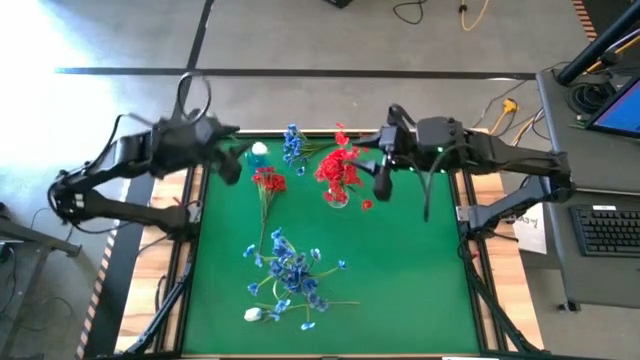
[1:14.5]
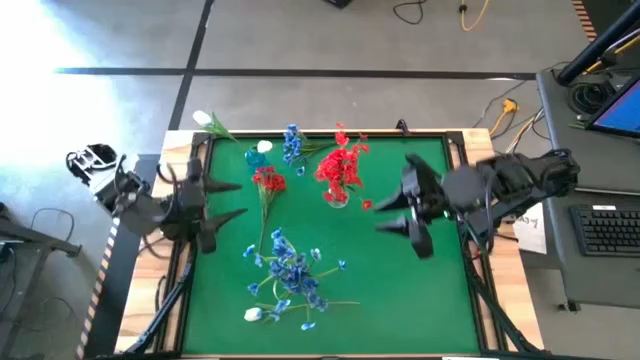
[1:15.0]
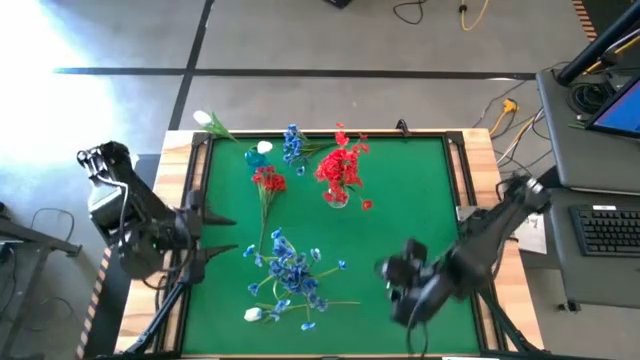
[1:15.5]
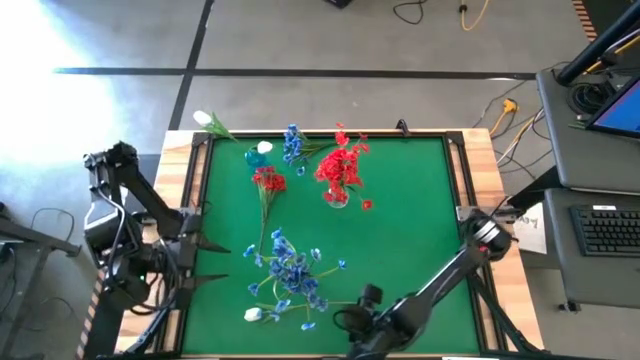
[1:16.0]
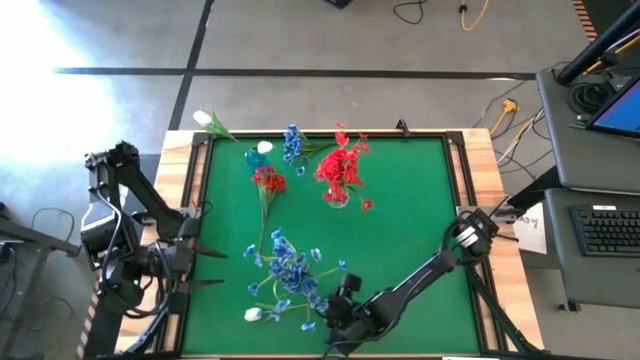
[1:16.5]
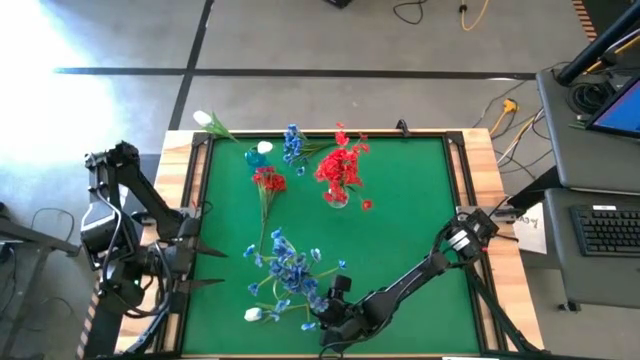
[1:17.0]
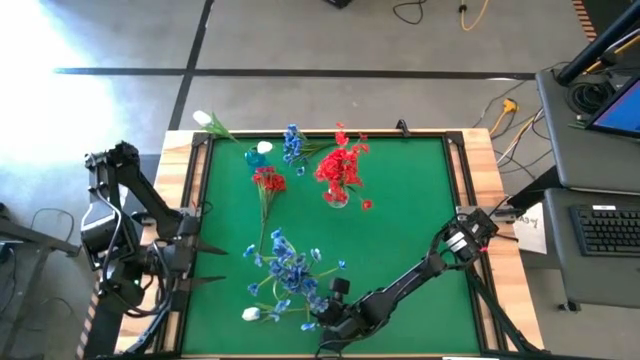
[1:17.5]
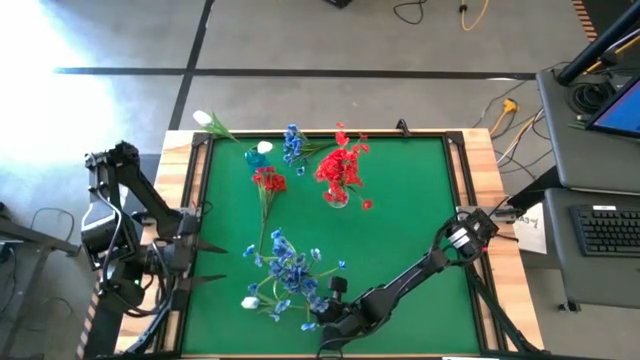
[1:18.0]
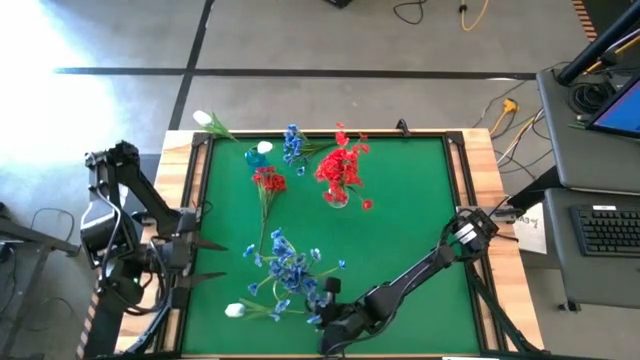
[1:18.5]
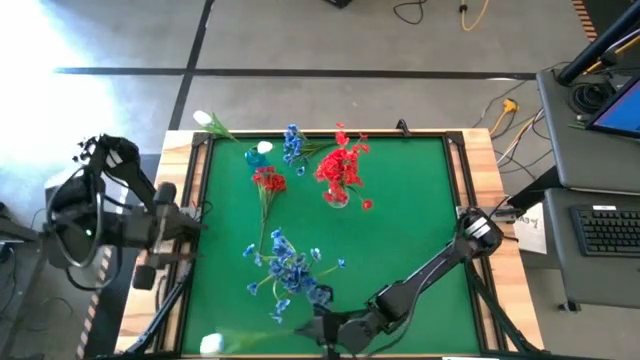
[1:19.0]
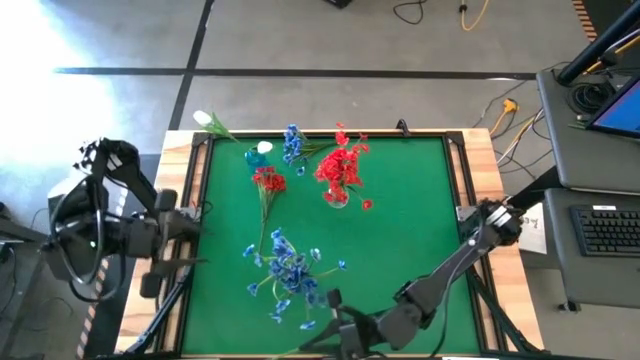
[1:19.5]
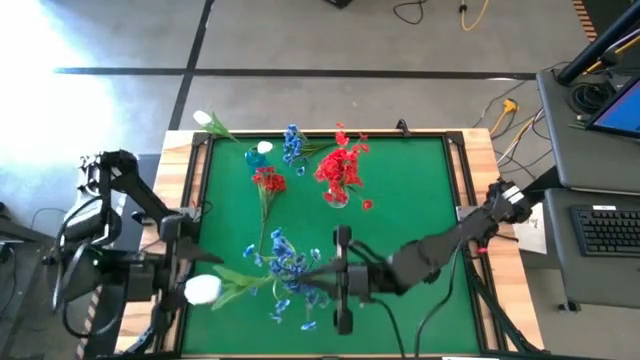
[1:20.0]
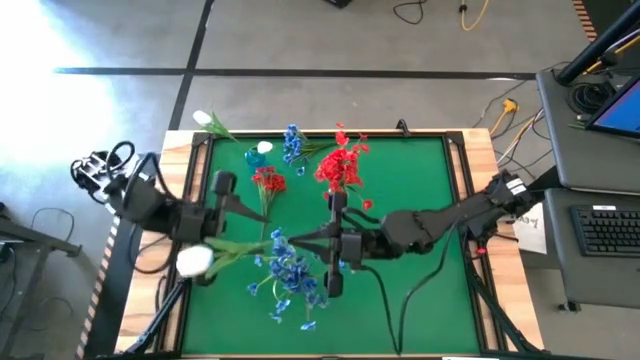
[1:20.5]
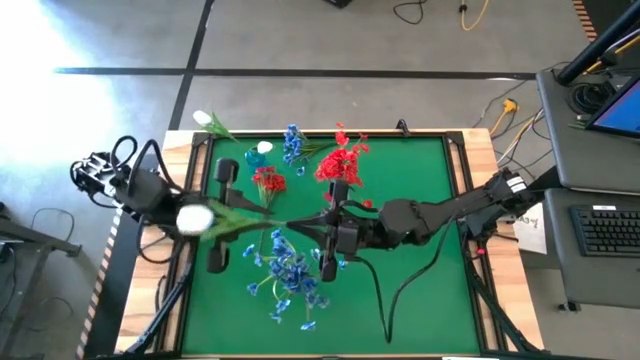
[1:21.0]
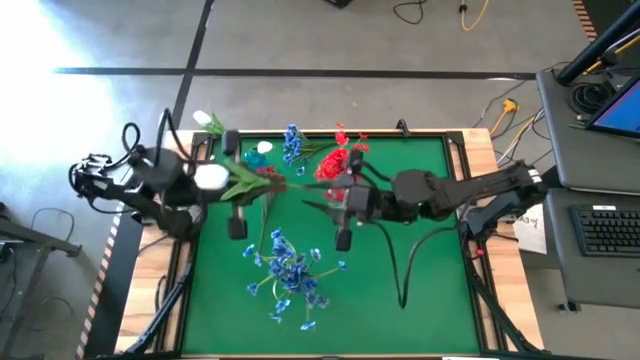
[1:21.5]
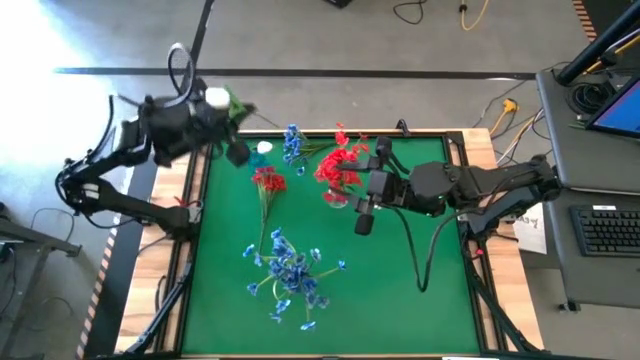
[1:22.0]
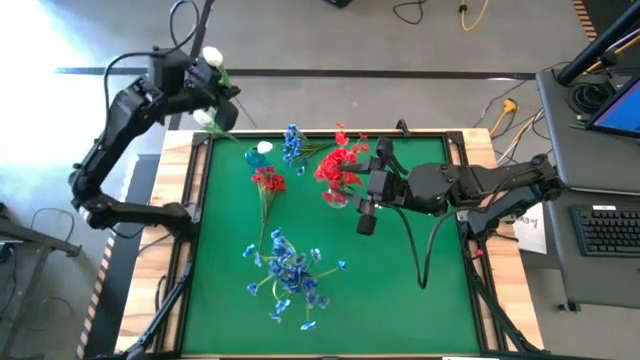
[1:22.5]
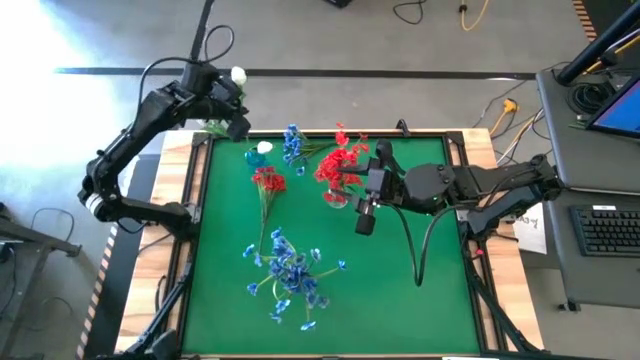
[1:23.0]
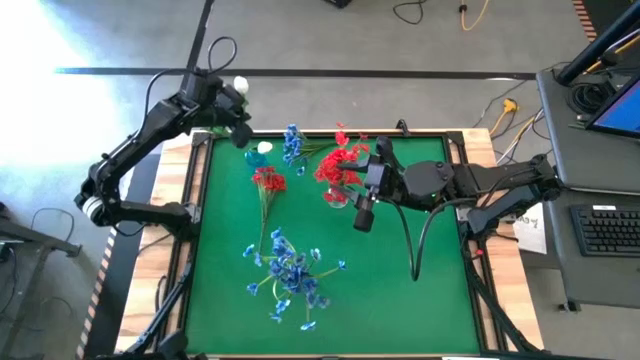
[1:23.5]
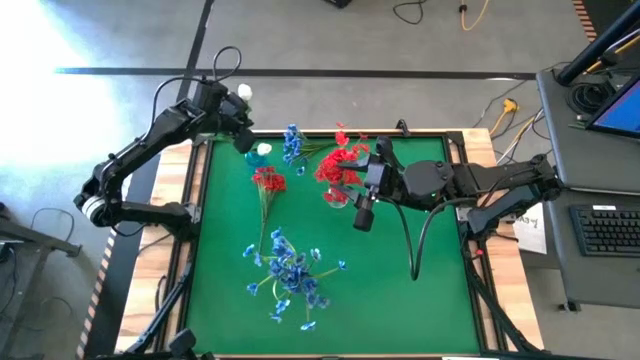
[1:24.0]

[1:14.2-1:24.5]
Task: Sort flowers into vase by color
Put the white flower into the the blue vase

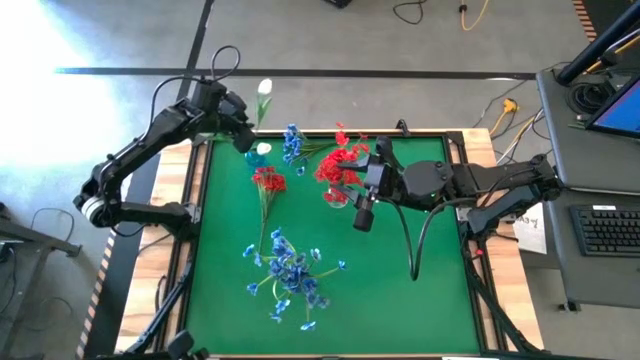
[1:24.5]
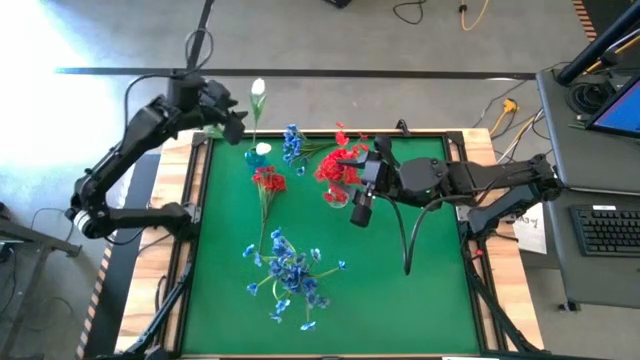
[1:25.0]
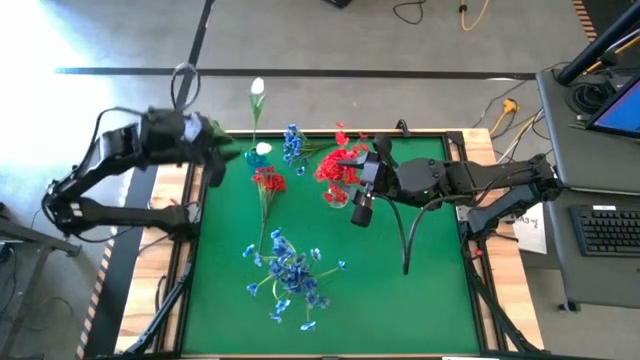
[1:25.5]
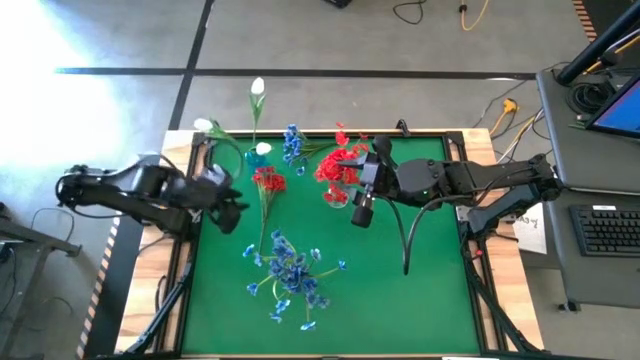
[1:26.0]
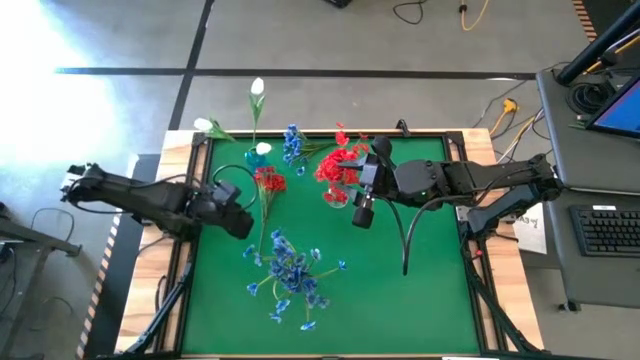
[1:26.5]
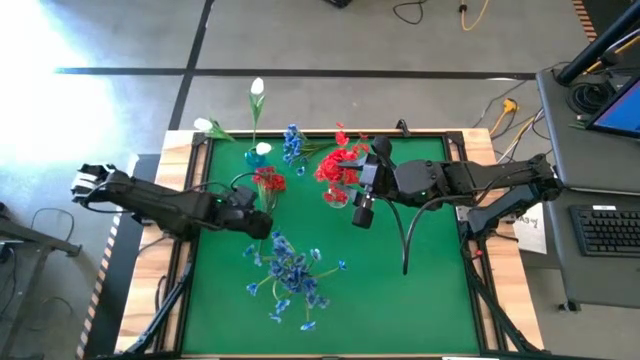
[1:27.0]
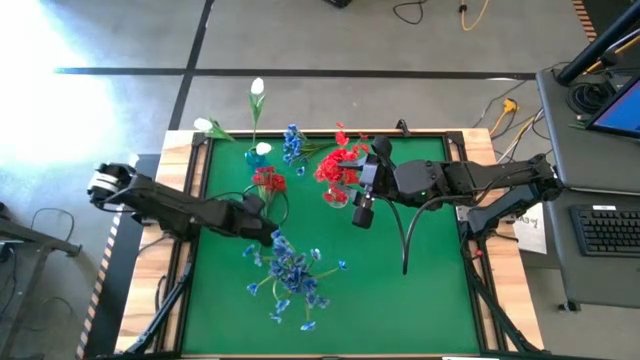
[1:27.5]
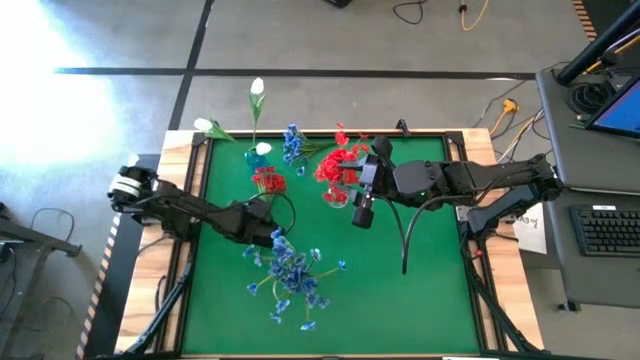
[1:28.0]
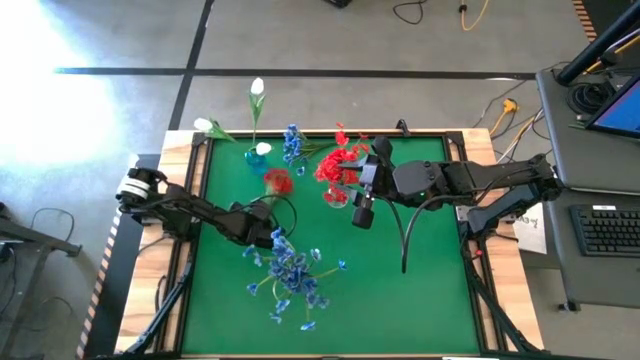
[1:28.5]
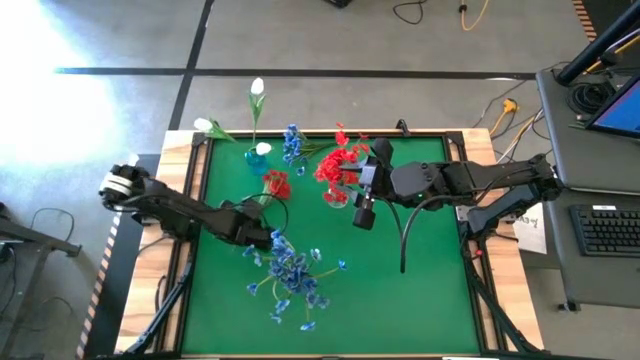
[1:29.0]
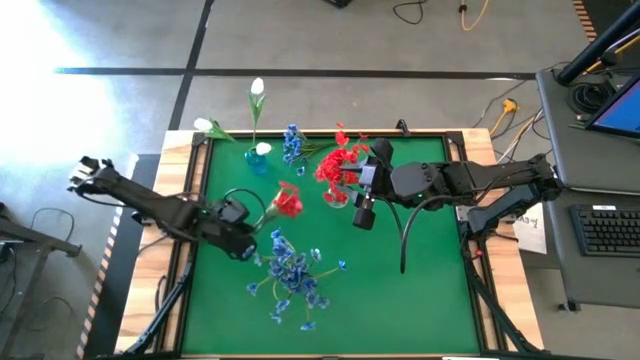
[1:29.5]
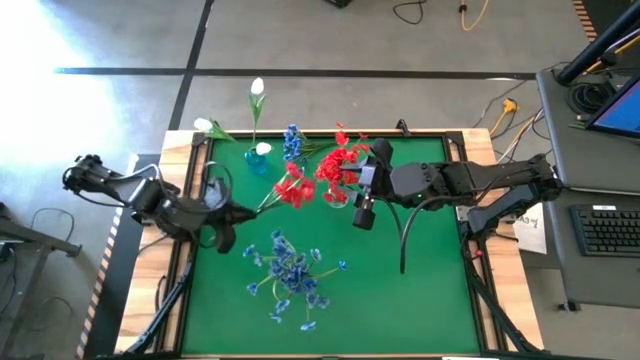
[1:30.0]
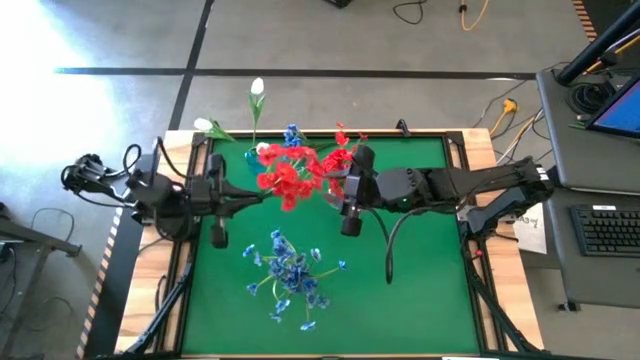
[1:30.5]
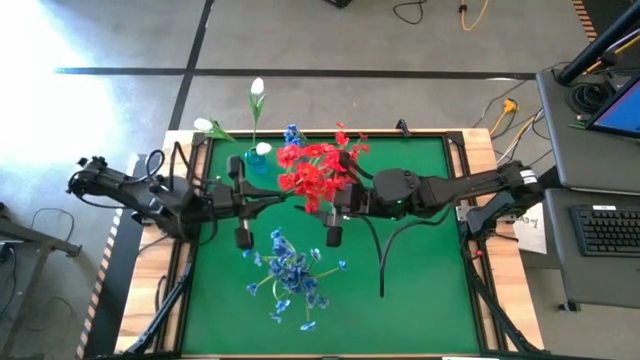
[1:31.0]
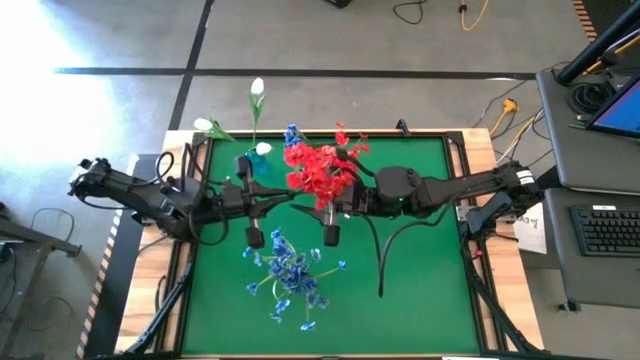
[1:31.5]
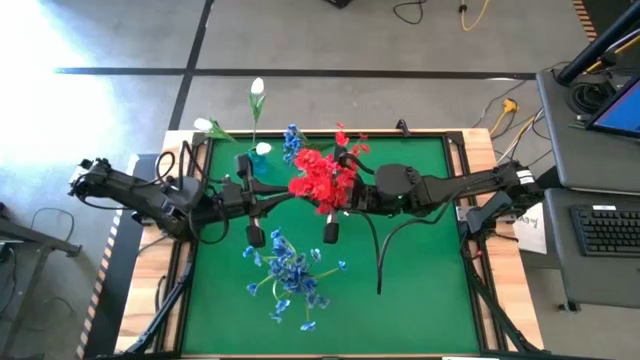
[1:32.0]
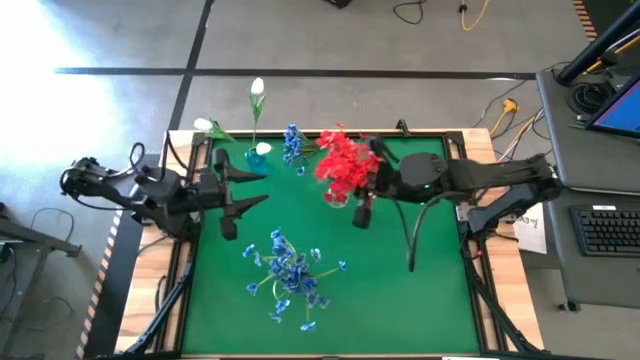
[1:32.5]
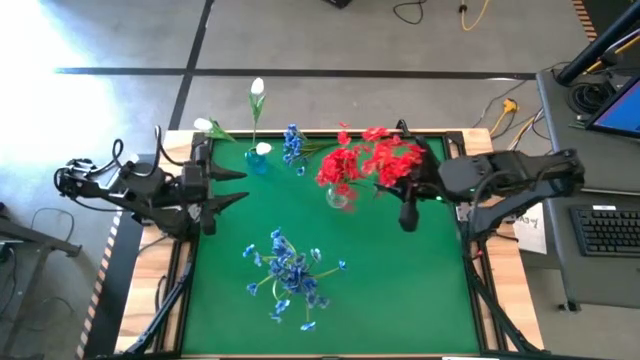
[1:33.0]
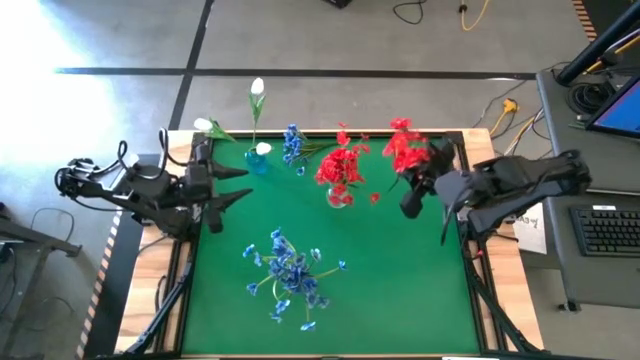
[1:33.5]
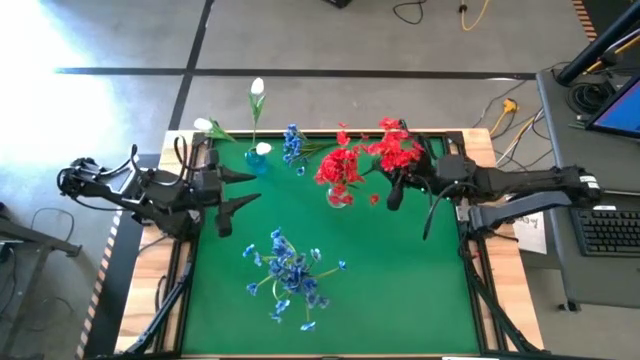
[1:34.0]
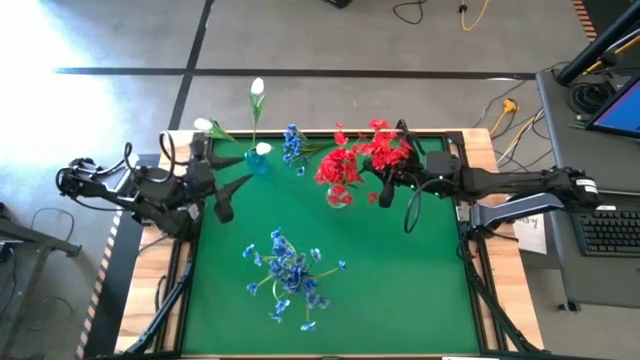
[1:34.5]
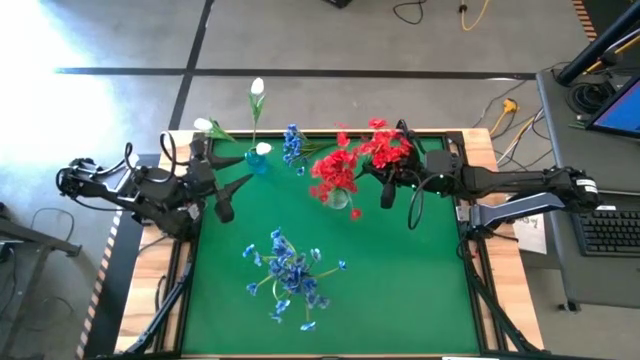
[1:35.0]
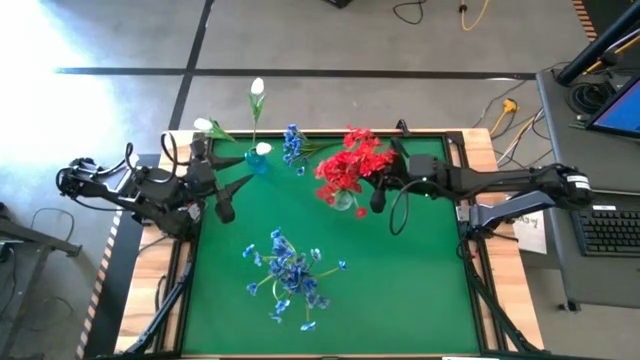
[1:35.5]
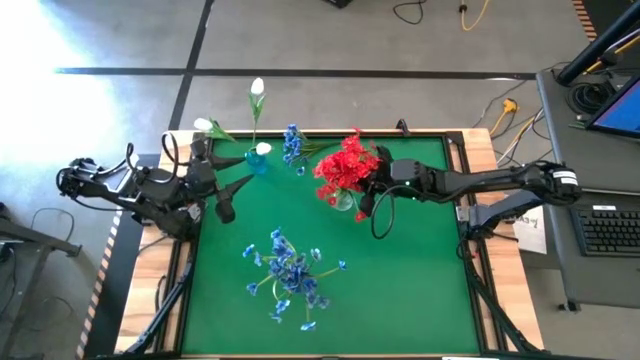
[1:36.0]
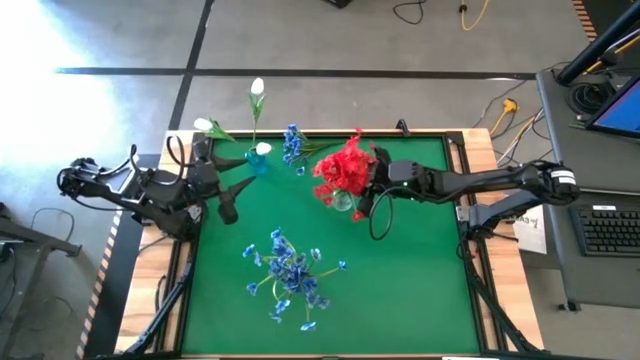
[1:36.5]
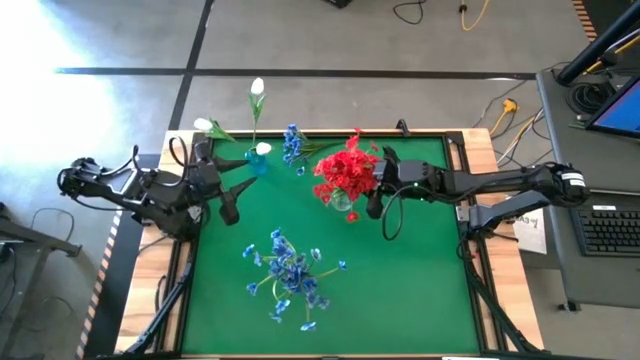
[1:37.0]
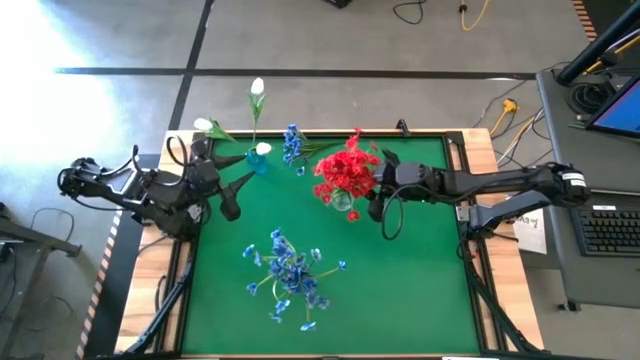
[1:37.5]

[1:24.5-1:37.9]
Put the red flowers into the transparent vase
